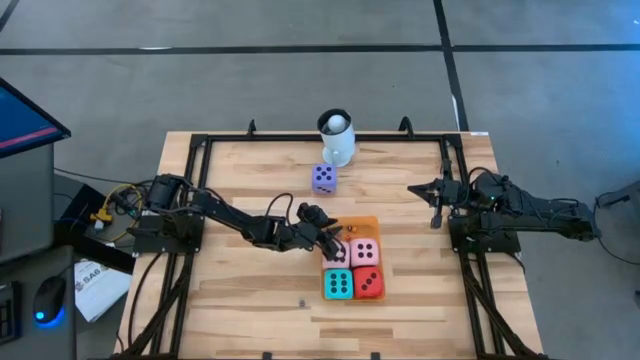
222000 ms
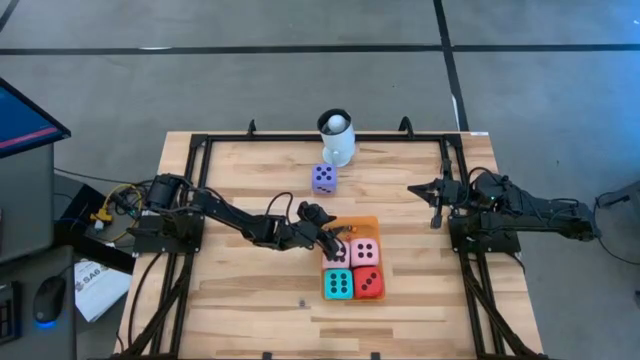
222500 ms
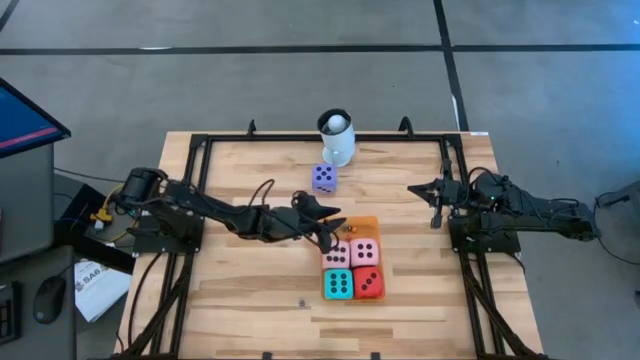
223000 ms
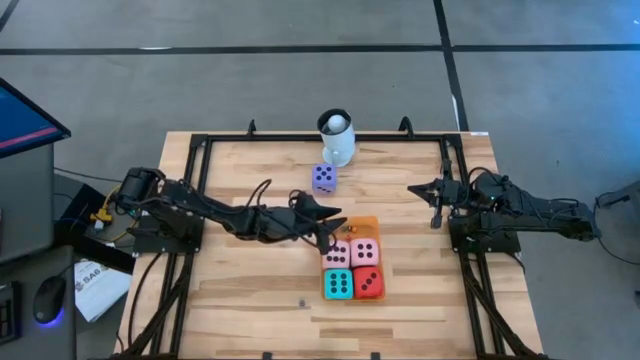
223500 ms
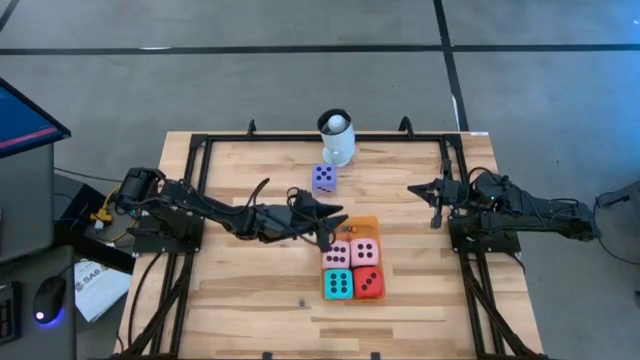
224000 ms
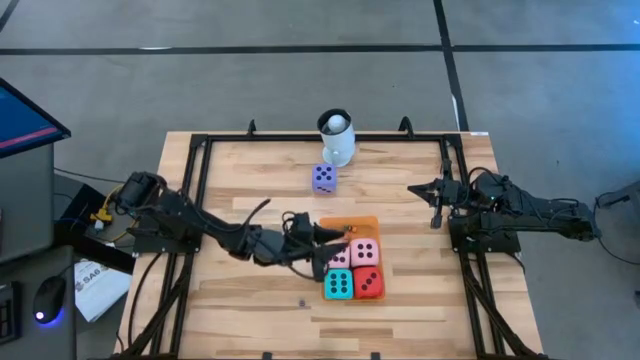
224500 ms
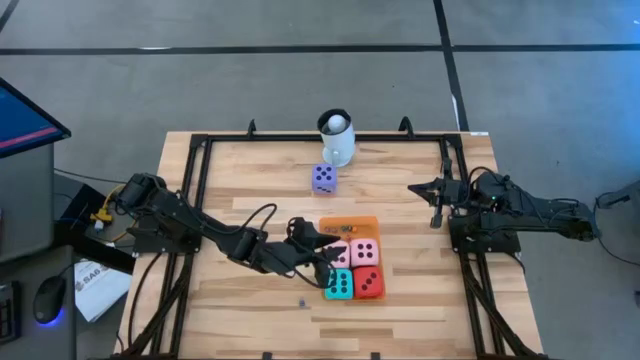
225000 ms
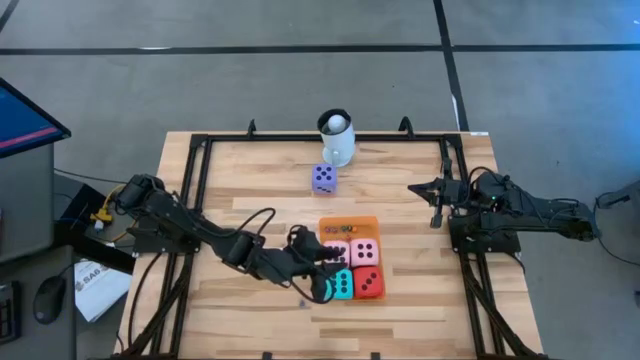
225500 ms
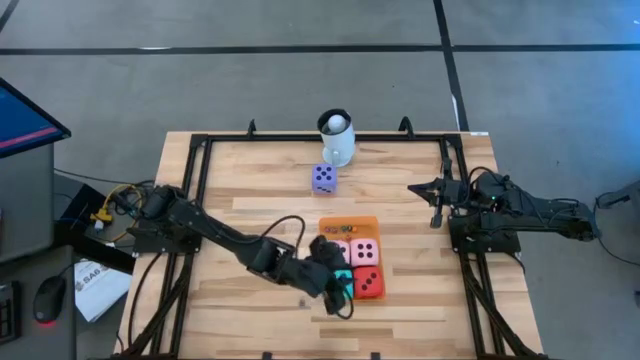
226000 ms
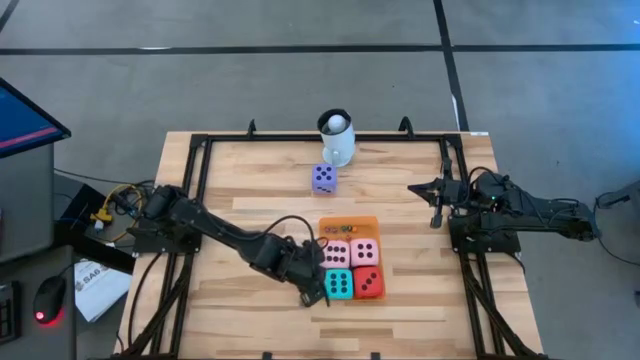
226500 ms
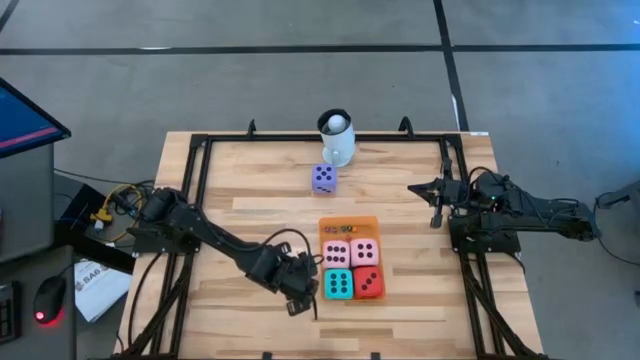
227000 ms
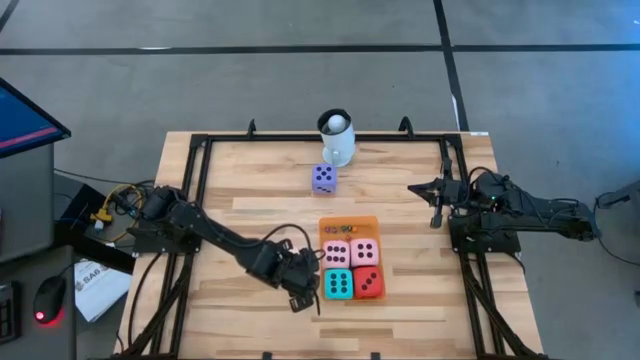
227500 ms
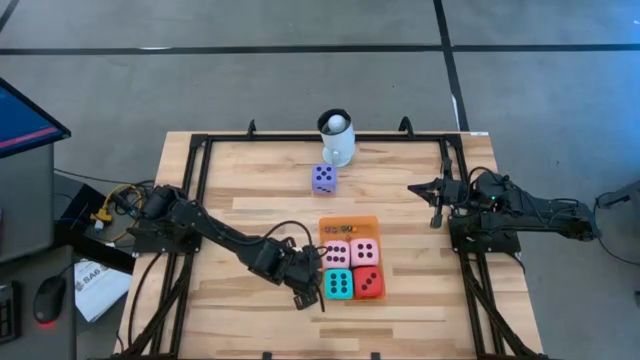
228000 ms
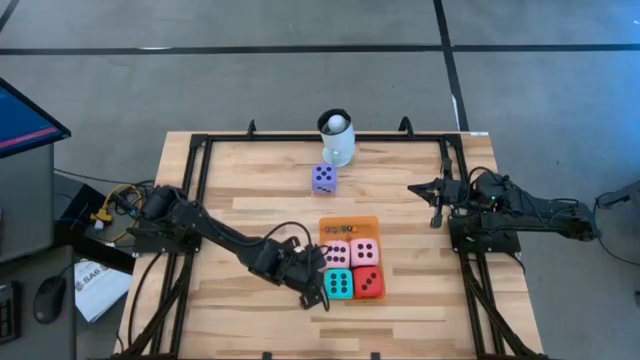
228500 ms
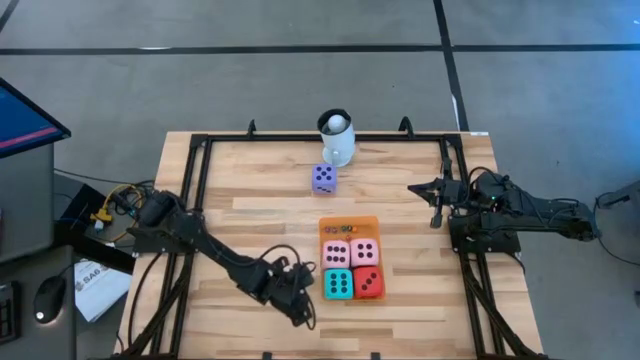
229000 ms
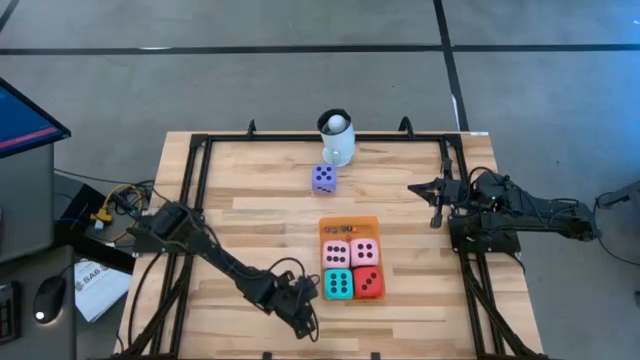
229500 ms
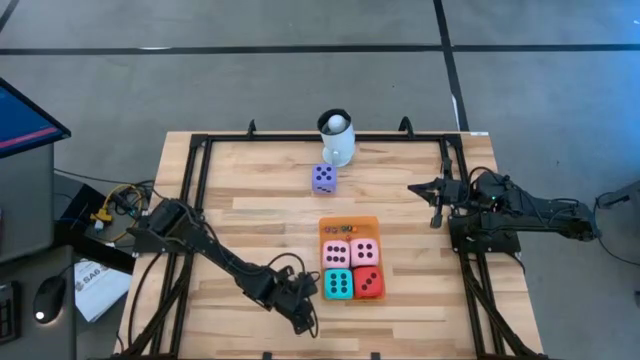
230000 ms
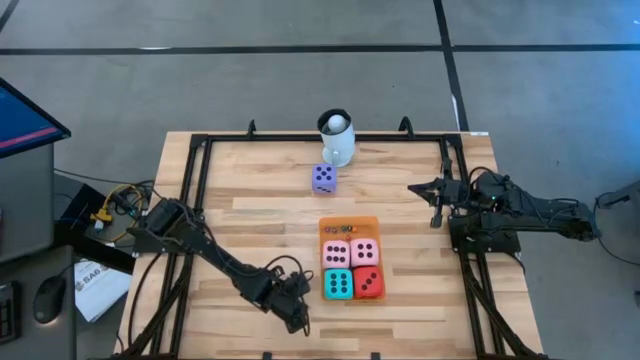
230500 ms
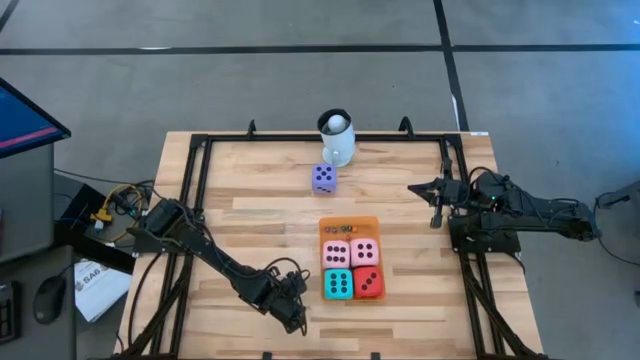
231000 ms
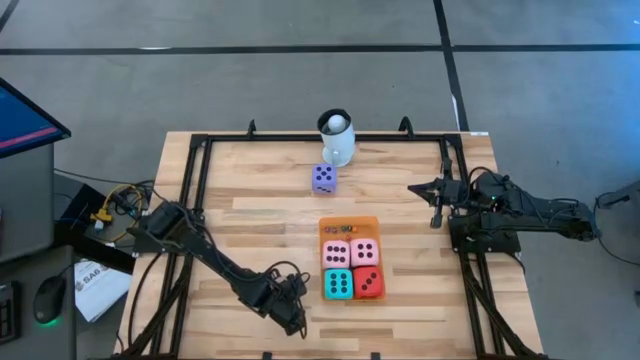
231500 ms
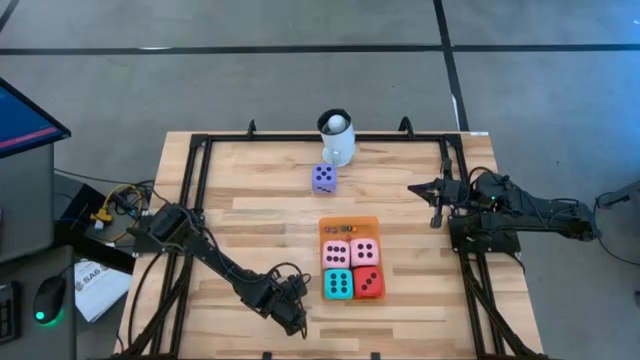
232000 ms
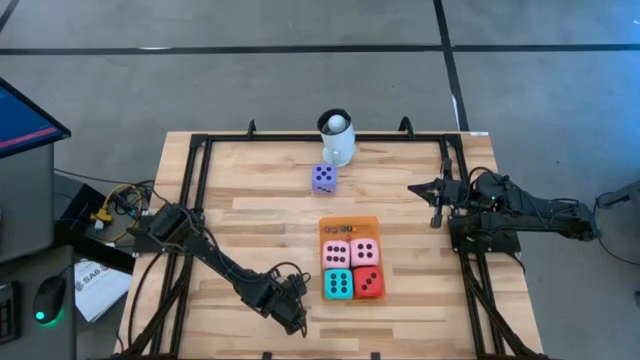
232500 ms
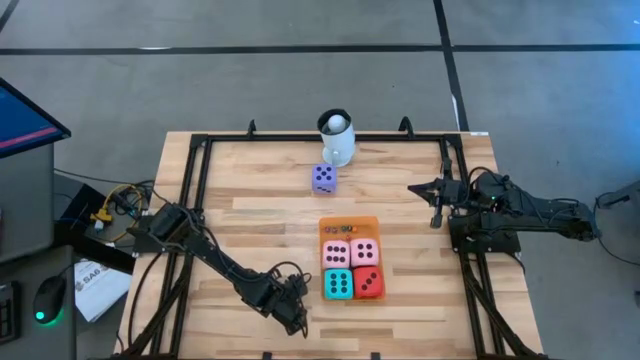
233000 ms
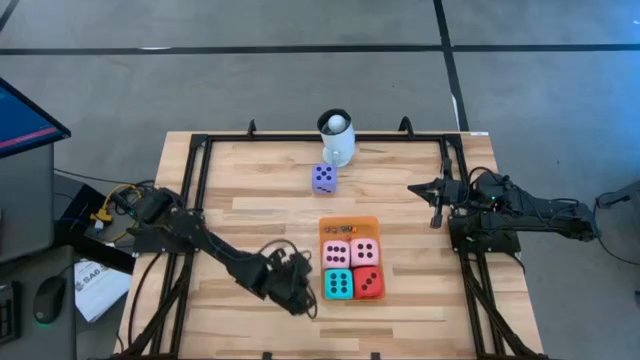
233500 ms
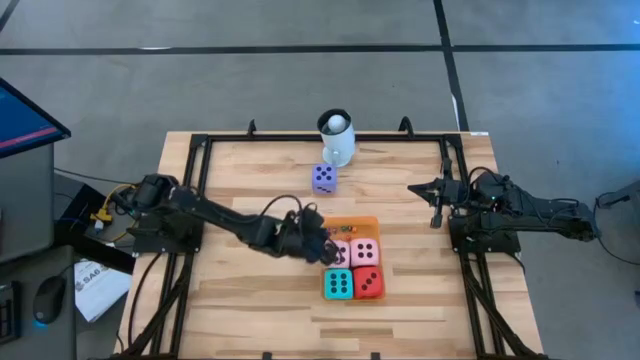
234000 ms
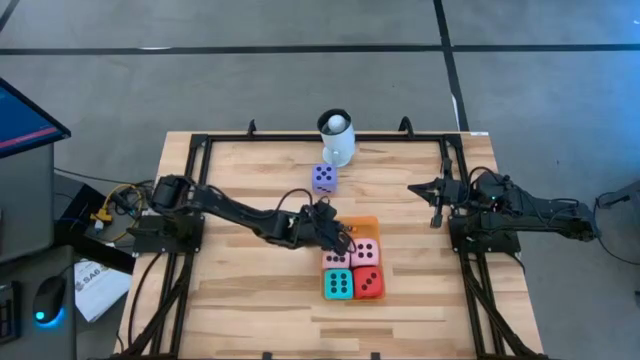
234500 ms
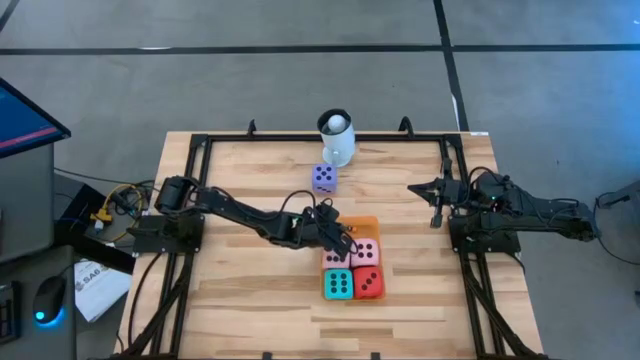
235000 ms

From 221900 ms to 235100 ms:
Task: Pick & Place Dice
Put the small blue dice into the orange bin

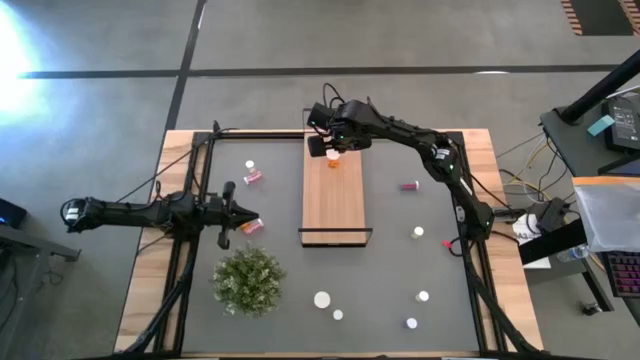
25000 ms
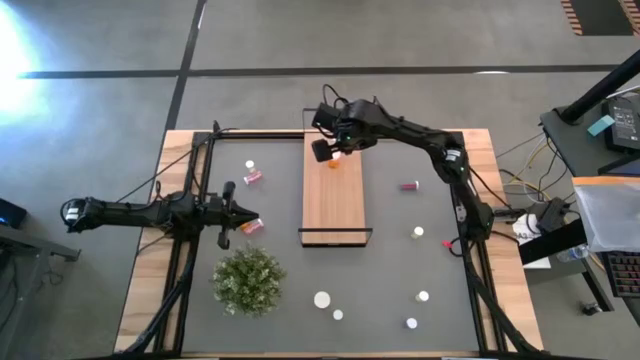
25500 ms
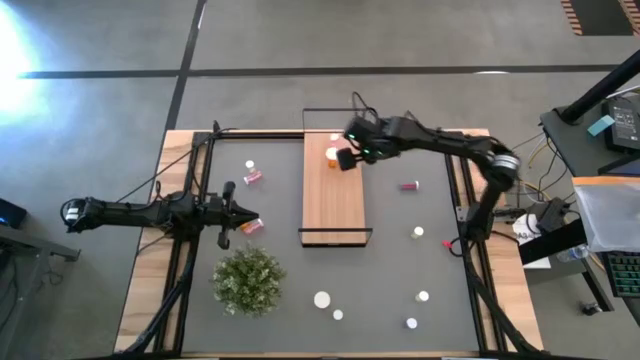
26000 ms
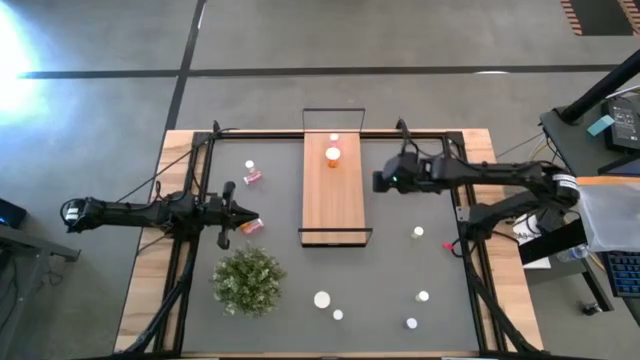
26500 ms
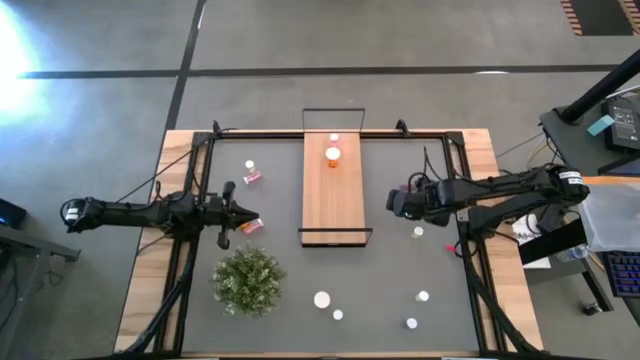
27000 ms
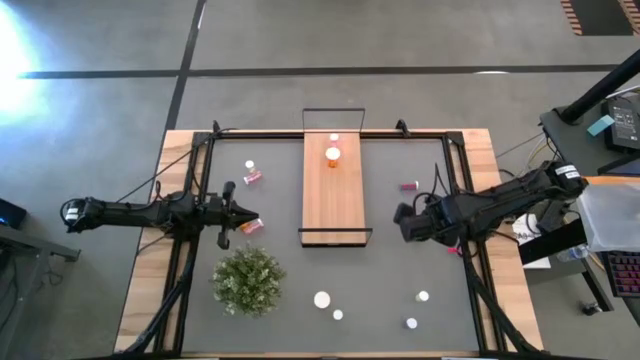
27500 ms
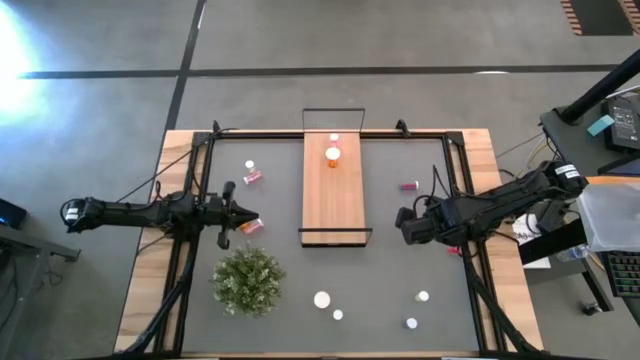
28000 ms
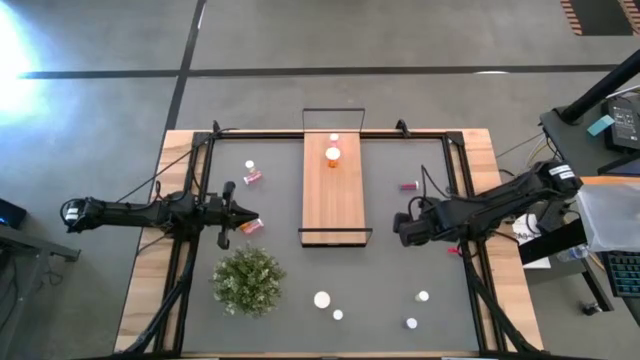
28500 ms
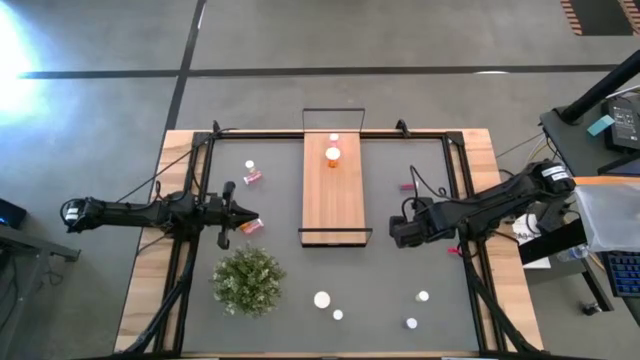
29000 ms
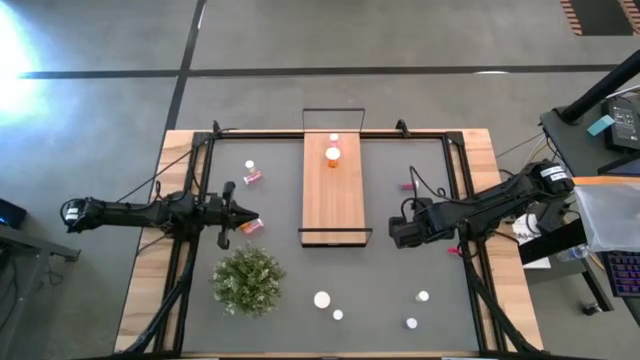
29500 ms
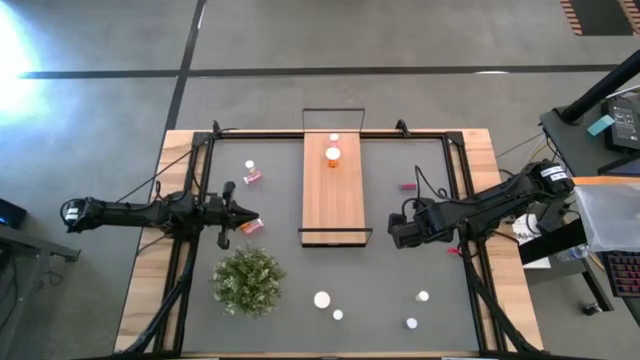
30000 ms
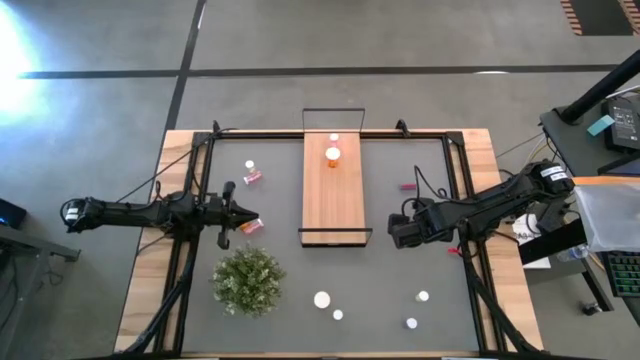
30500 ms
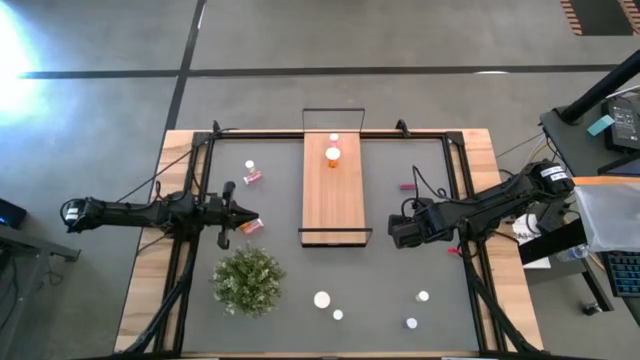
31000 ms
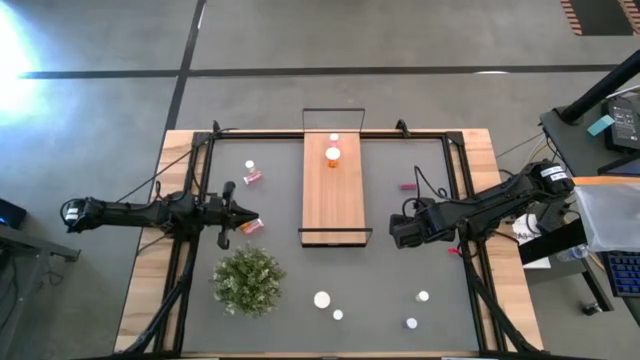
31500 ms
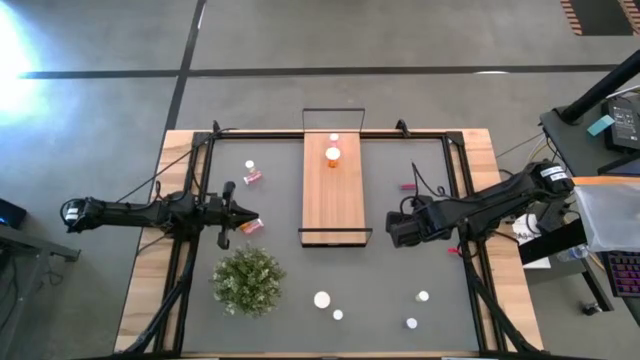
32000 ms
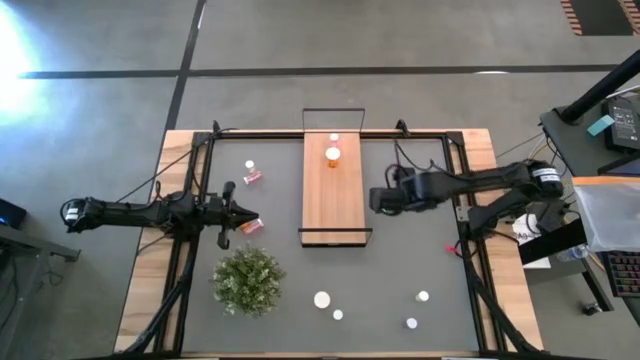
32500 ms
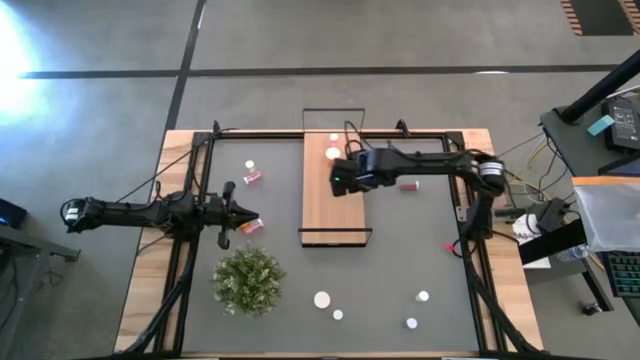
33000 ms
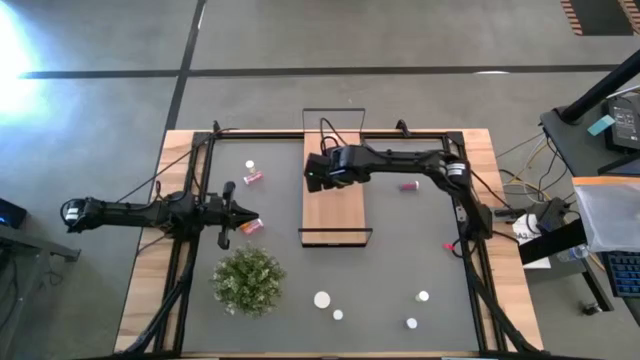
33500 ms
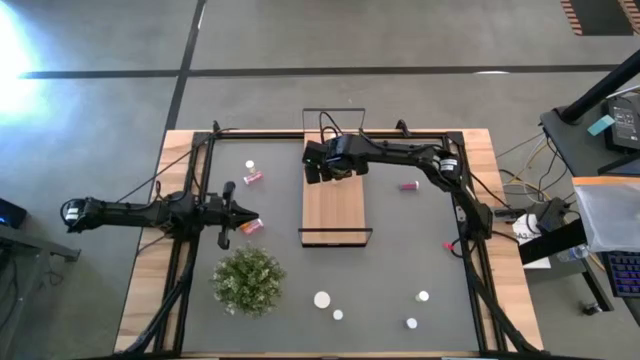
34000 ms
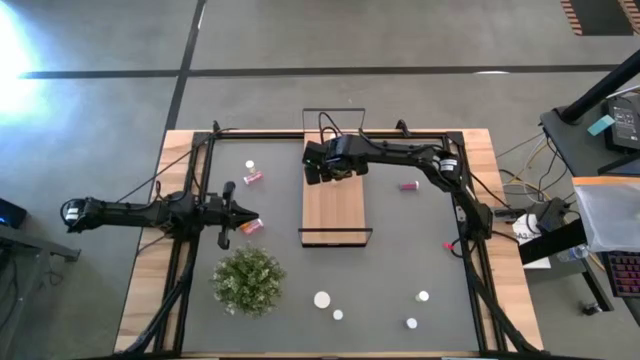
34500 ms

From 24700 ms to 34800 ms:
Task: Pick and place medicine bottles onto shelf by color
Put the middle right yellow pill bottle on the shelf
